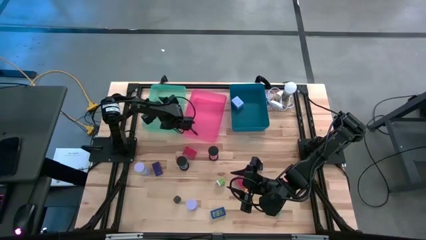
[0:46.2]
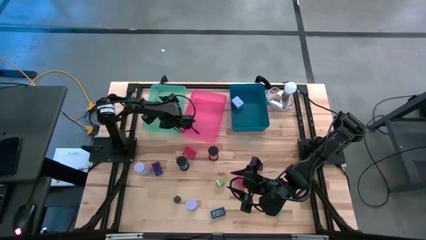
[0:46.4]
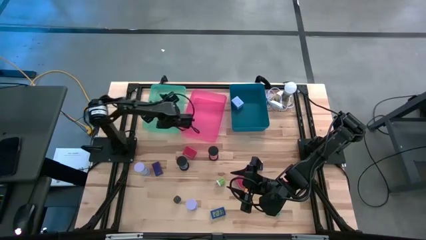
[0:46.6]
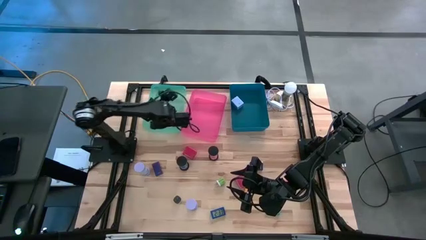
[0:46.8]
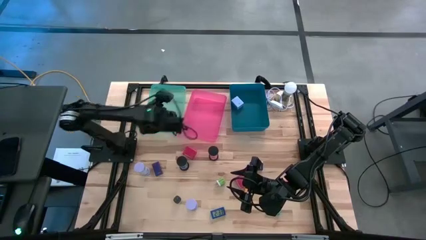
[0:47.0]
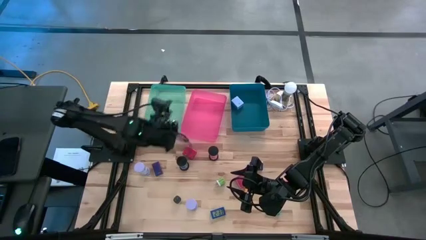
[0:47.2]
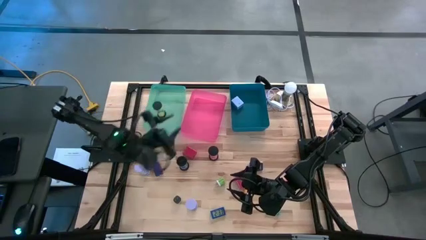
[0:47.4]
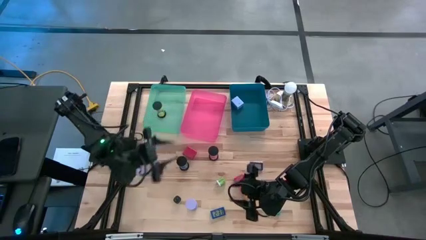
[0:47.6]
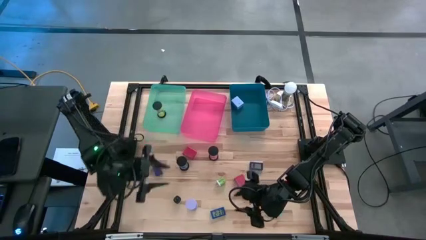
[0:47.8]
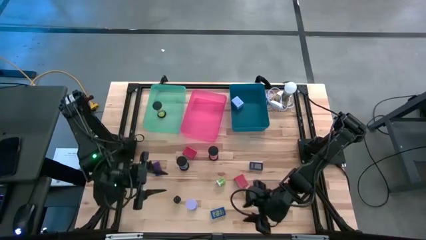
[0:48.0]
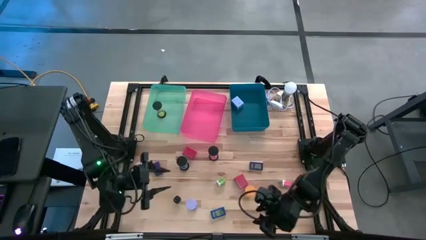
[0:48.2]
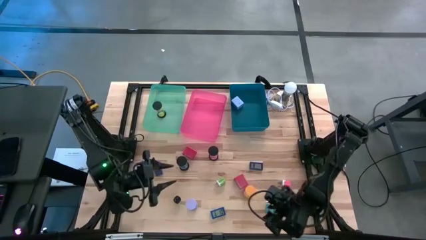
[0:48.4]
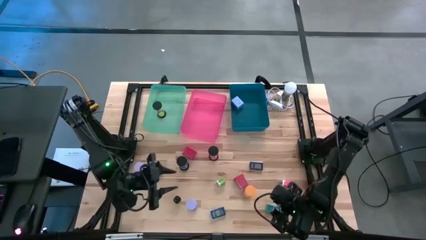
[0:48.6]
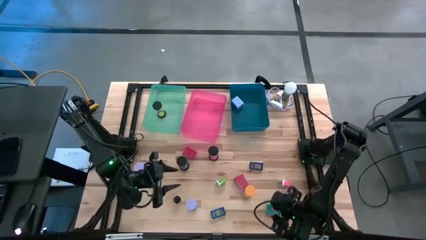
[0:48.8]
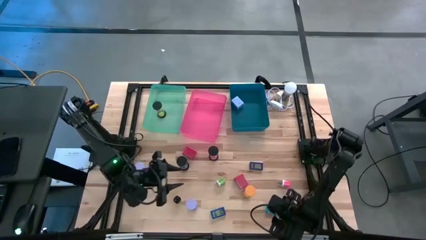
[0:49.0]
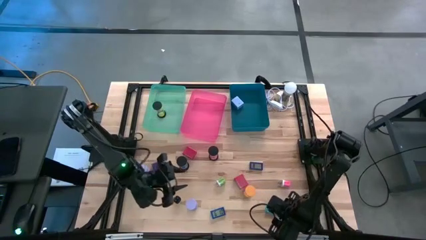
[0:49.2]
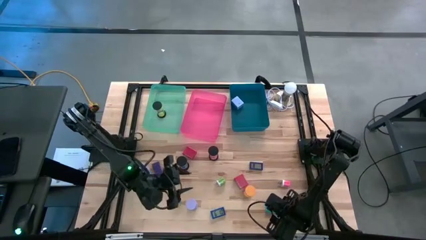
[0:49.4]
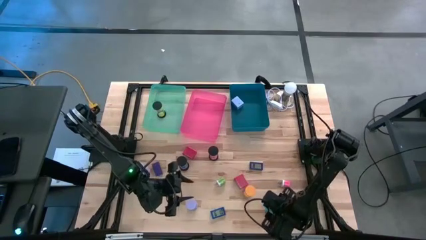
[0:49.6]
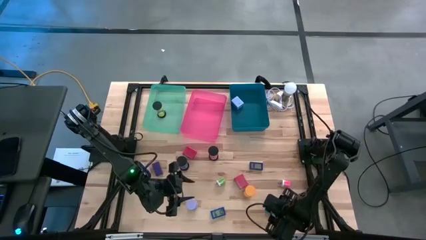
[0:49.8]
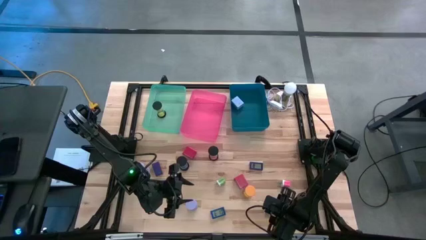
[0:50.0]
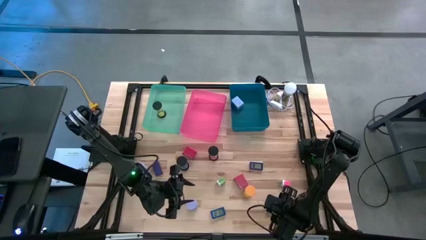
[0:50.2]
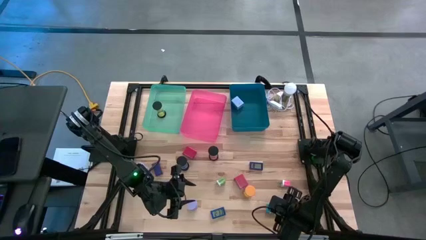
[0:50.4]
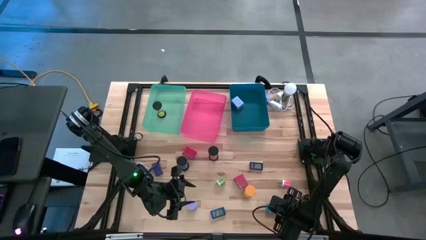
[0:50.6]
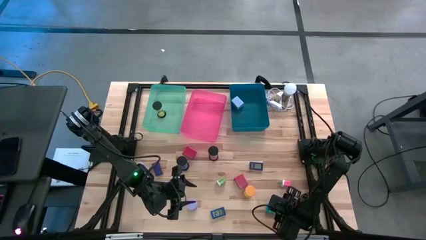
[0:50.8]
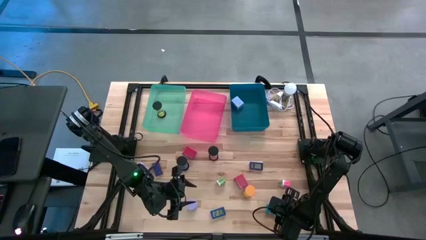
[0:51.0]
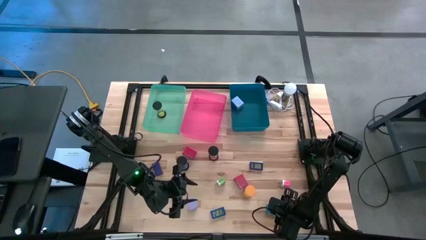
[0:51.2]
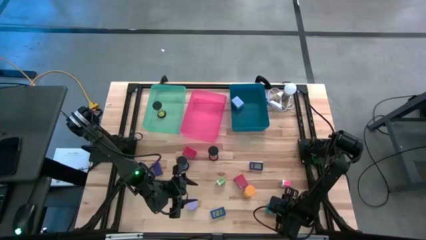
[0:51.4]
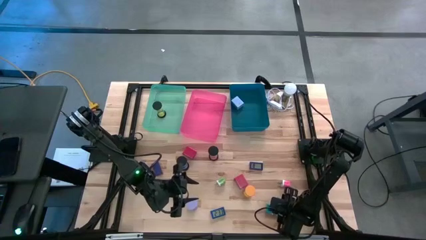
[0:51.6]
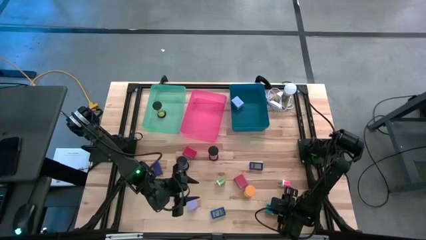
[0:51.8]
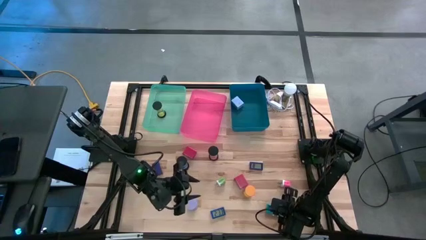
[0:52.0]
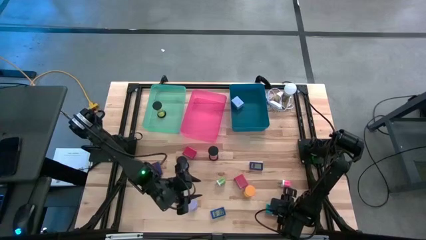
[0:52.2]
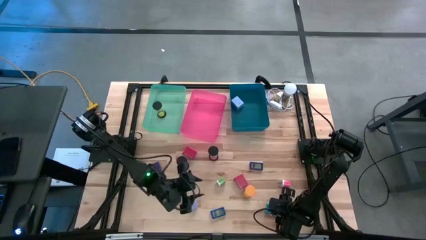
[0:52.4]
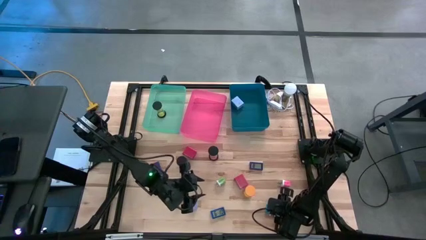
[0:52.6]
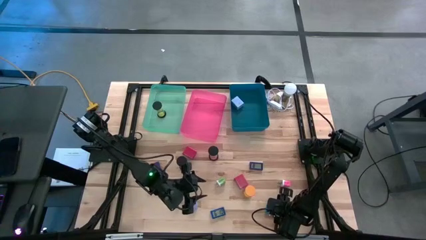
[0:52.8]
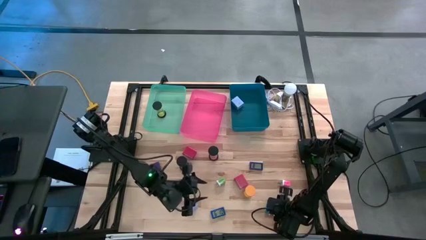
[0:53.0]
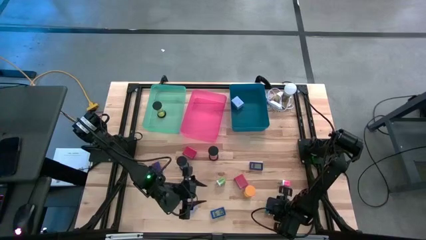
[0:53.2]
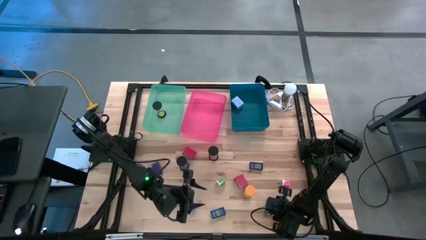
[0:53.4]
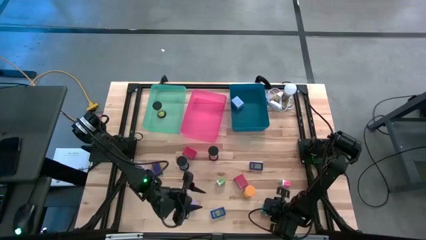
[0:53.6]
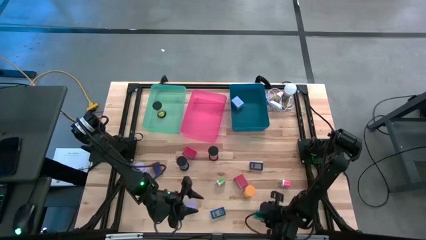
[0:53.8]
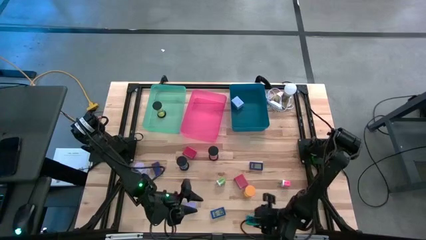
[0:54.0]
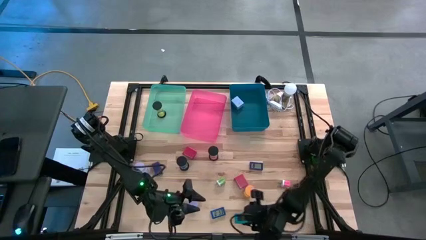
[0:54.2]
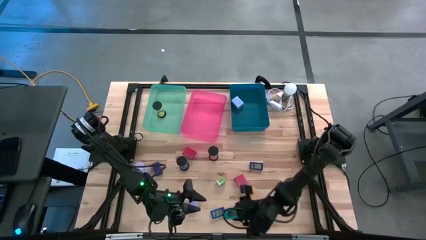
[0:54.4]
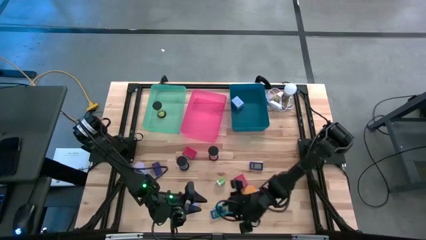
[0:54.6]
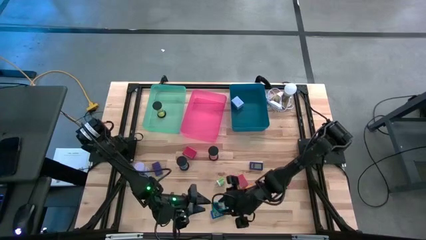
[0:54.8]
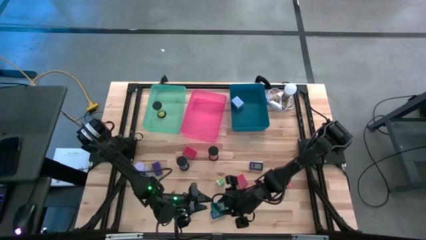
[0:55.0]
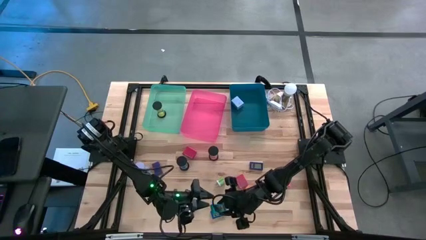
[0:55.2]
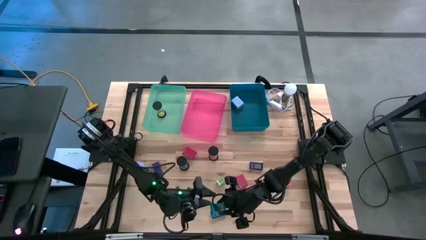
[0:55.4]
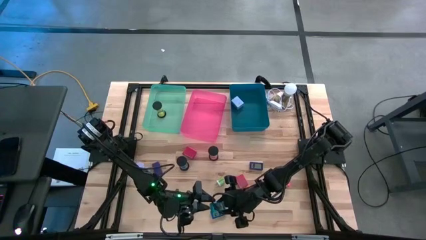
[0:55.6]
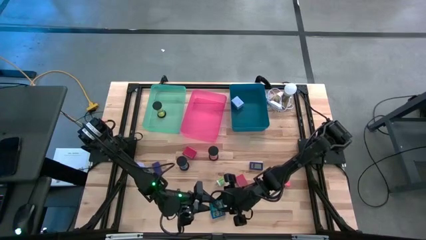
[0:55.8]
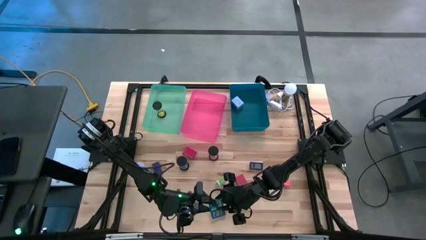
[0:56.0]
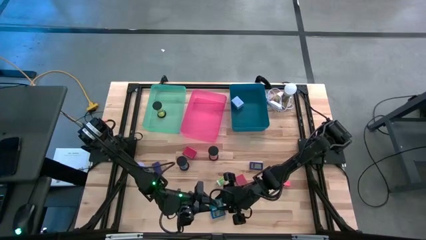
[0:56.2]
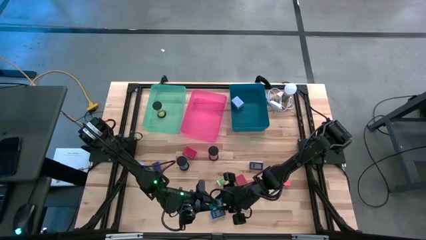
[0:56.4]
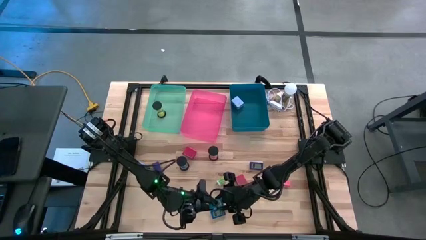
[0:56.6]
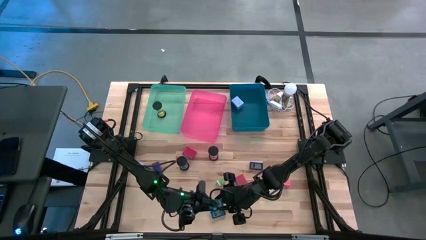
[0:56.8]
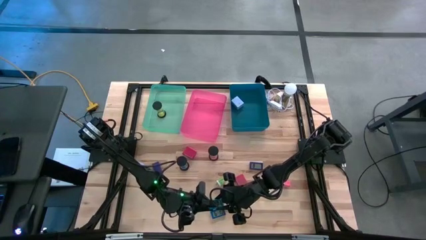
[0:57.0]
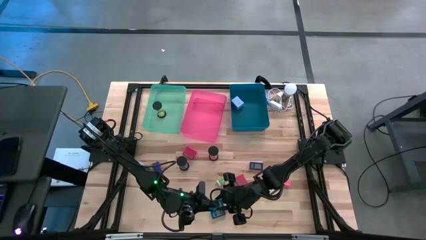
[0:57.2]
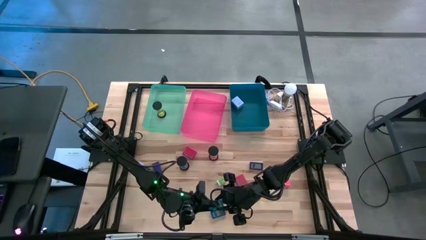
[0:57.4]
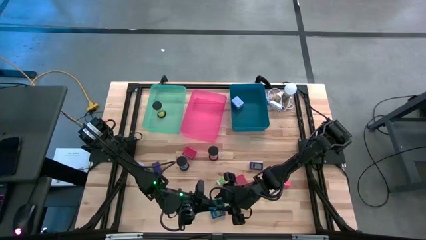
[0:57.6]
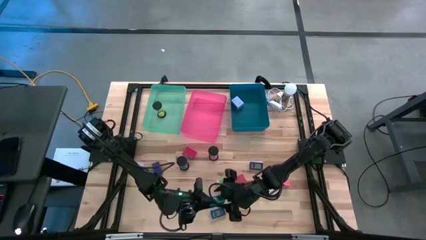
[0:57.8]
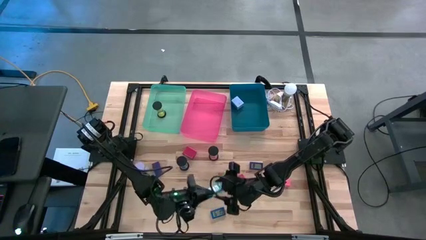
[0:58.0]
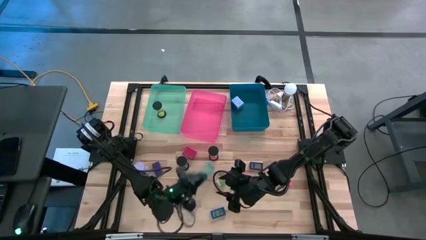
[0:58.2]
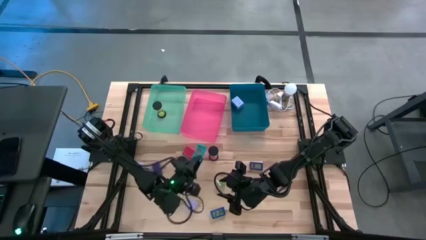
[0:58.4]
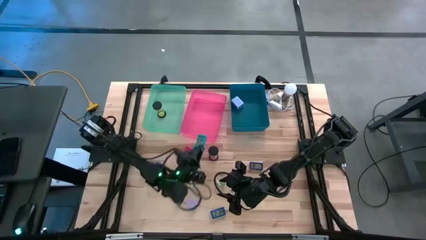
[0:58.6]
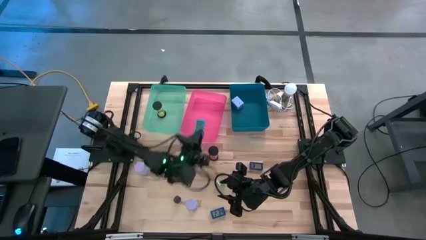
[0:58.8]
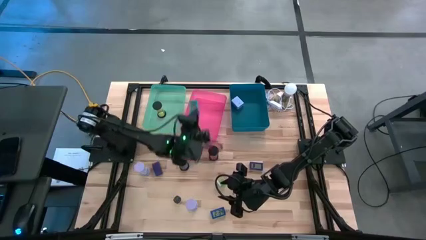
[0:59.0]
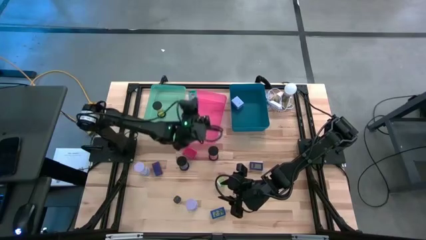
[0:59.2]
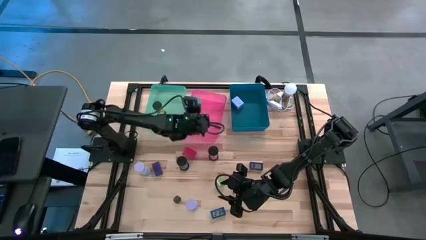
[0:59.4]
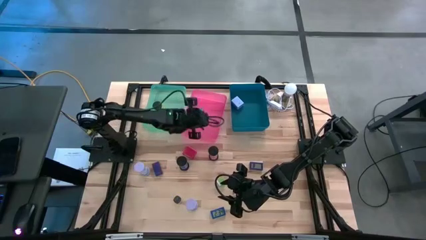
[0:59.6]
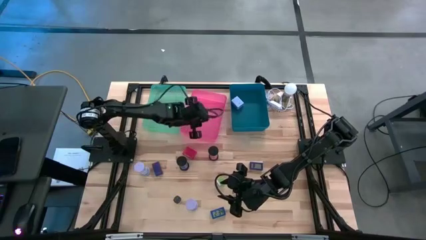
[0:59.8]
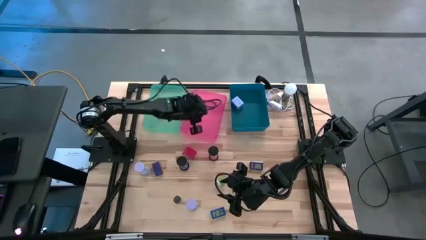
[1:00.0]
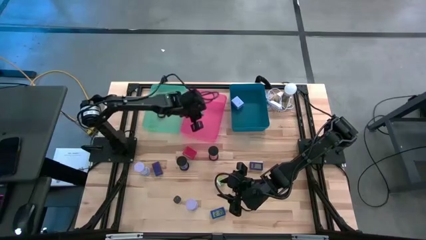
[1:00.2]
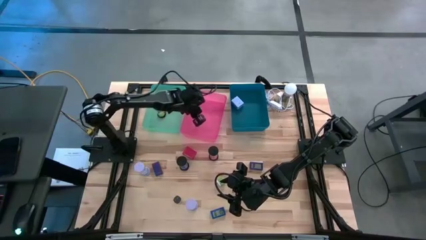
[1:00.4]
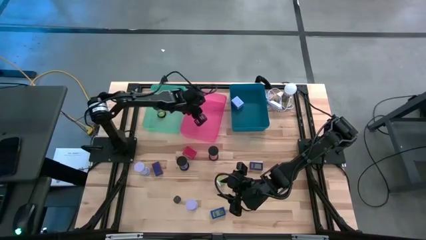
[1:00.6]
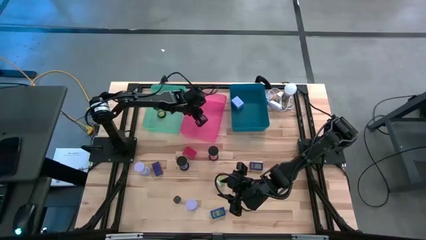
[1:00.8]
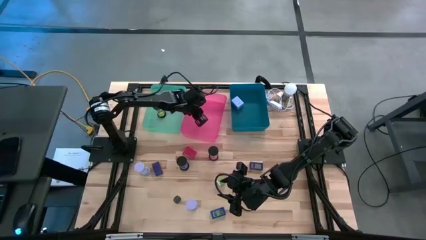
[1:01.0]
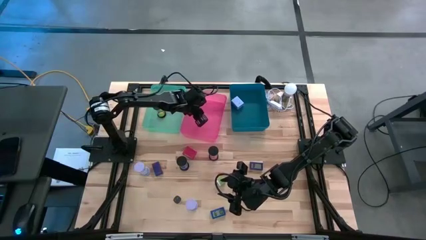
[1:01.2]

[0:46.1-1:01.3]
Task: Pick & Place Office items
Put the light blue digital clock into the pink bin
